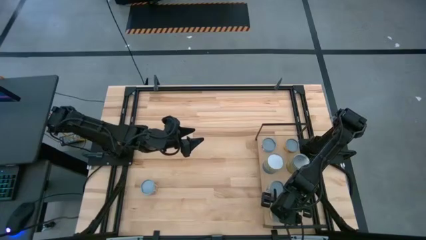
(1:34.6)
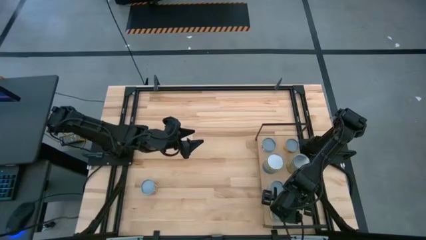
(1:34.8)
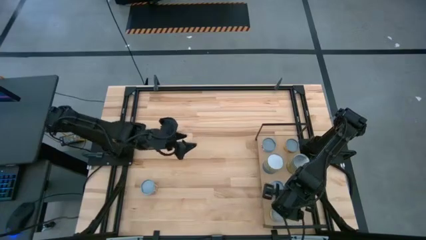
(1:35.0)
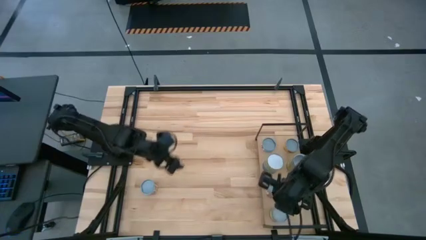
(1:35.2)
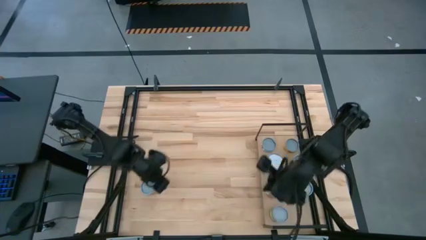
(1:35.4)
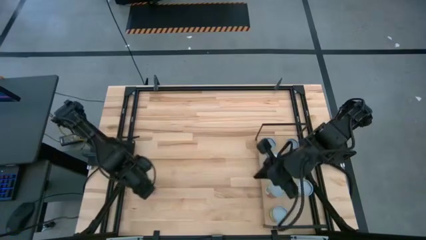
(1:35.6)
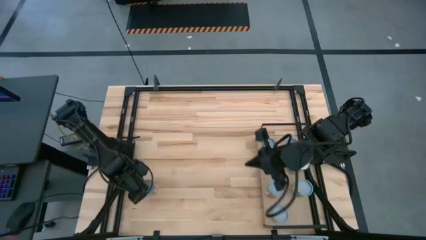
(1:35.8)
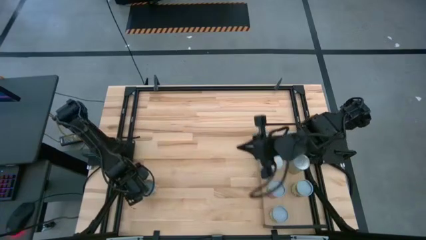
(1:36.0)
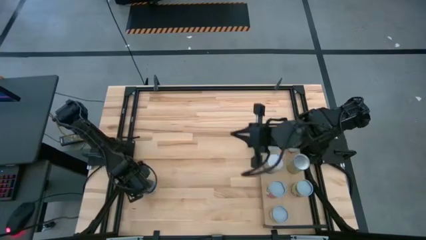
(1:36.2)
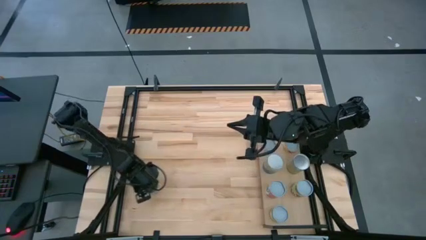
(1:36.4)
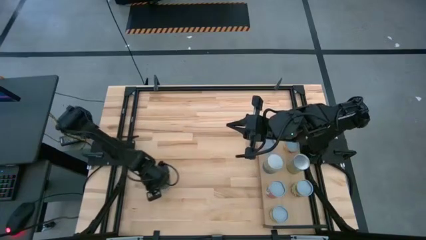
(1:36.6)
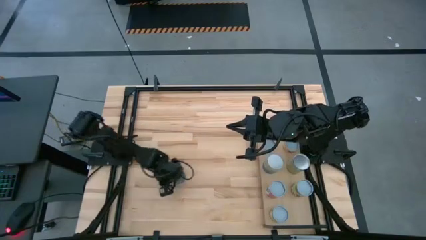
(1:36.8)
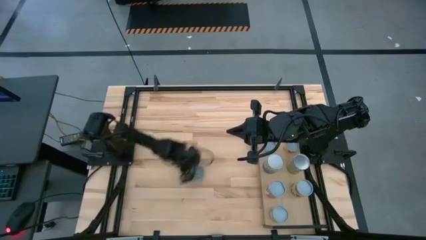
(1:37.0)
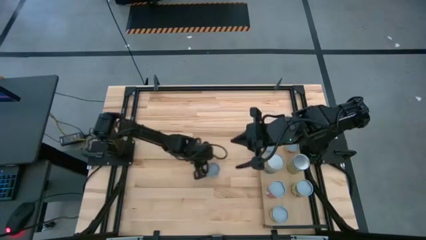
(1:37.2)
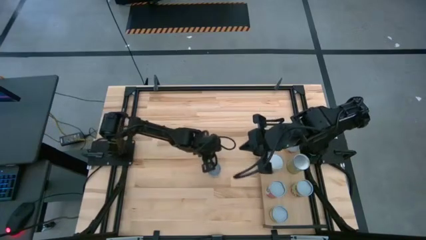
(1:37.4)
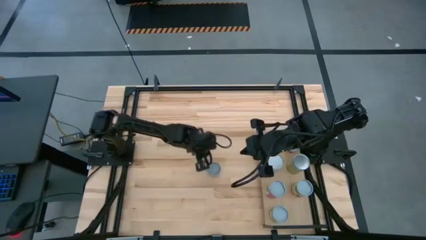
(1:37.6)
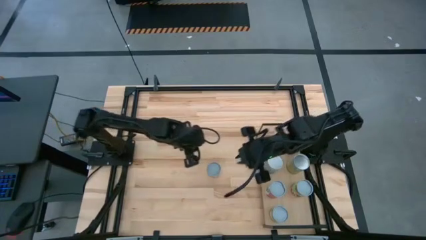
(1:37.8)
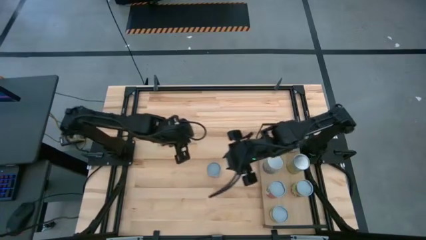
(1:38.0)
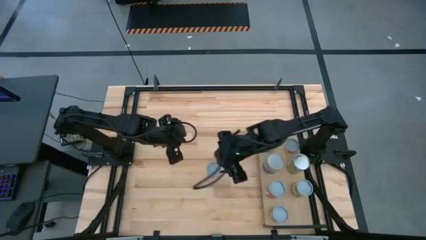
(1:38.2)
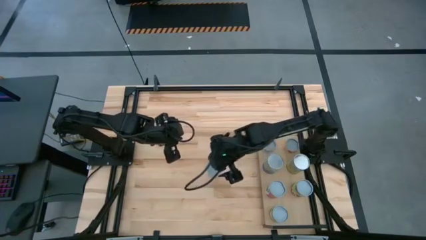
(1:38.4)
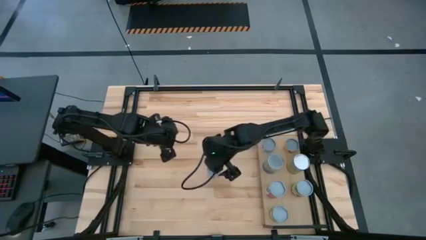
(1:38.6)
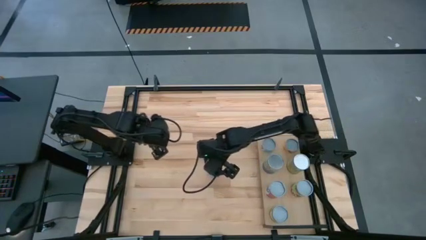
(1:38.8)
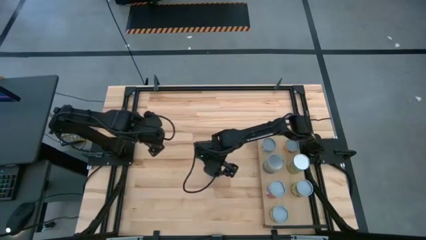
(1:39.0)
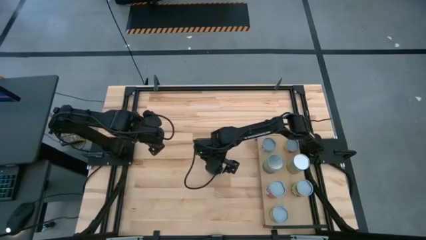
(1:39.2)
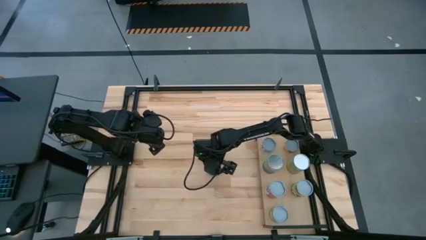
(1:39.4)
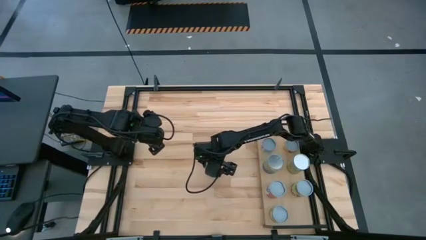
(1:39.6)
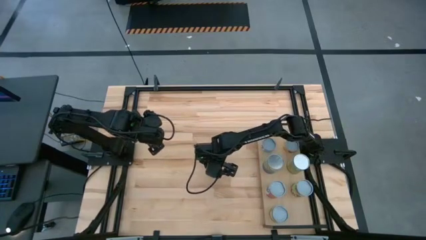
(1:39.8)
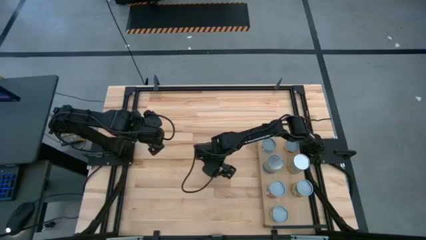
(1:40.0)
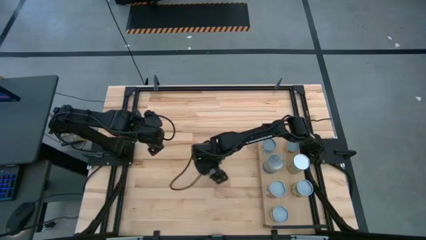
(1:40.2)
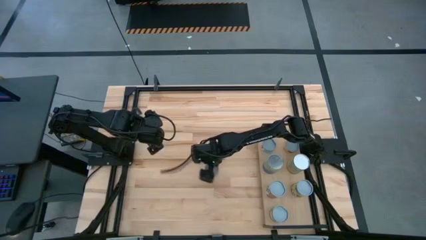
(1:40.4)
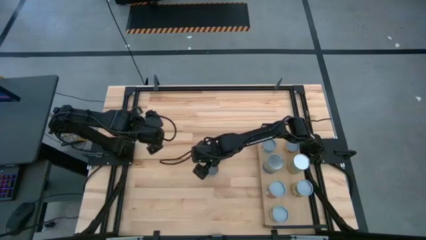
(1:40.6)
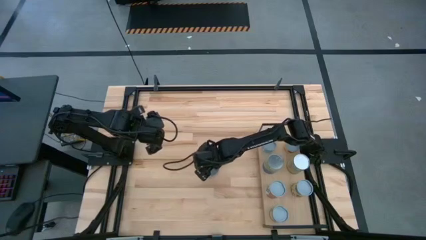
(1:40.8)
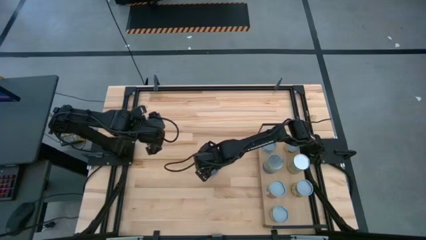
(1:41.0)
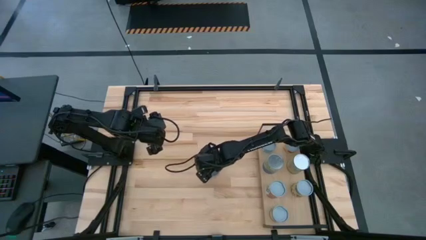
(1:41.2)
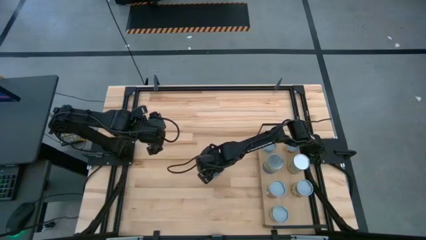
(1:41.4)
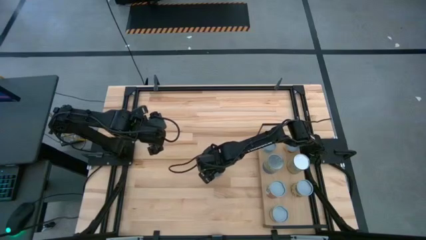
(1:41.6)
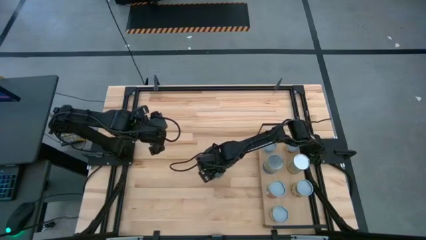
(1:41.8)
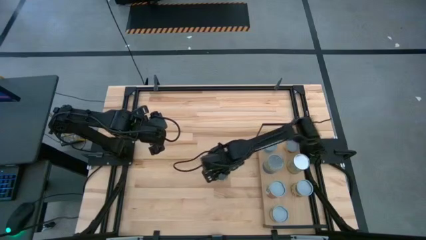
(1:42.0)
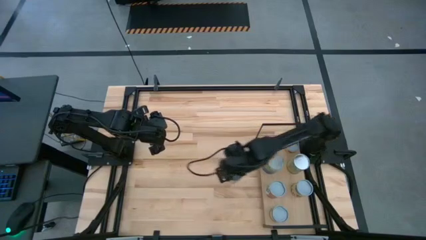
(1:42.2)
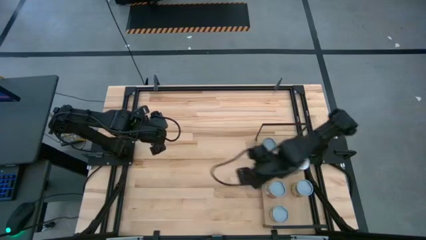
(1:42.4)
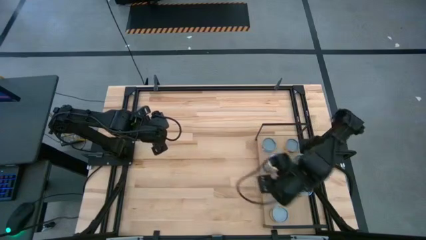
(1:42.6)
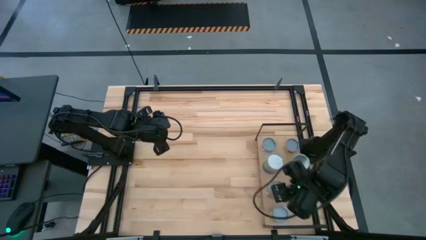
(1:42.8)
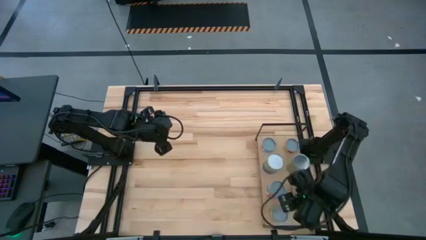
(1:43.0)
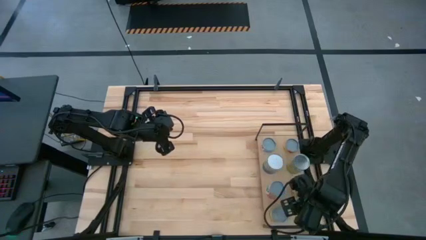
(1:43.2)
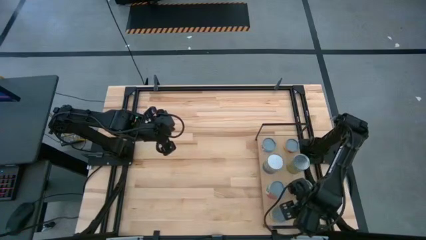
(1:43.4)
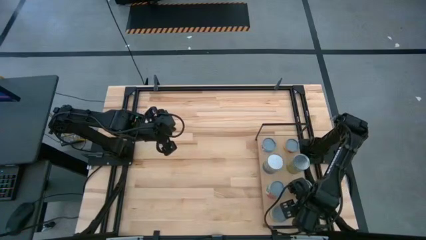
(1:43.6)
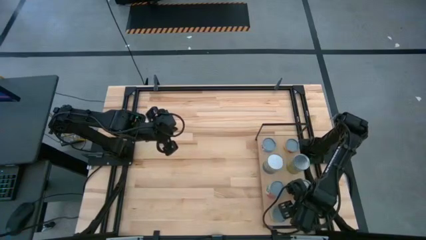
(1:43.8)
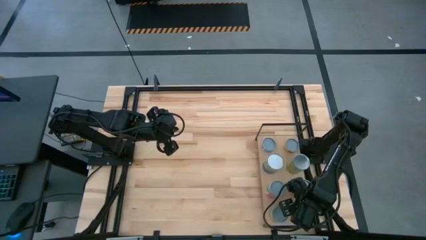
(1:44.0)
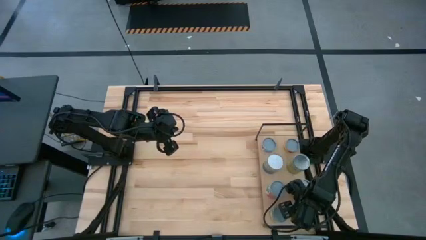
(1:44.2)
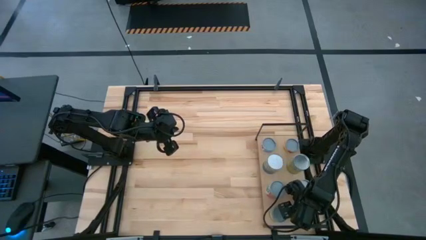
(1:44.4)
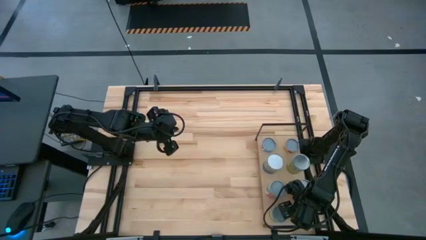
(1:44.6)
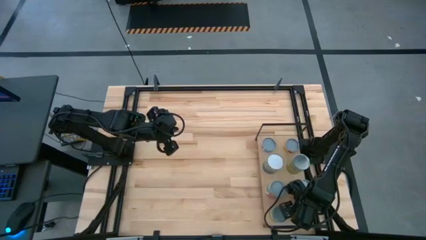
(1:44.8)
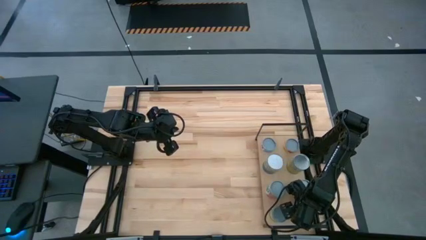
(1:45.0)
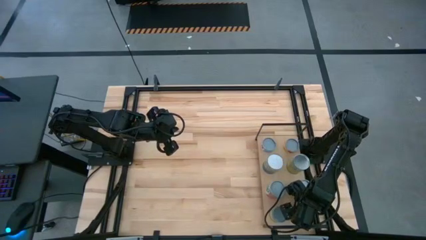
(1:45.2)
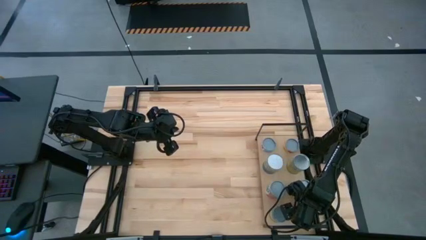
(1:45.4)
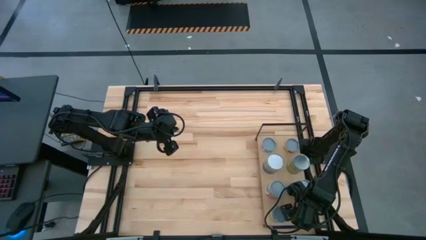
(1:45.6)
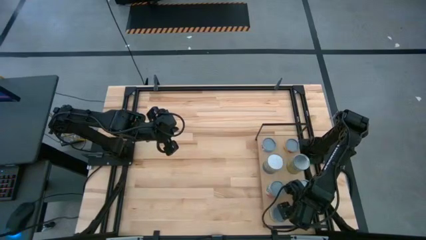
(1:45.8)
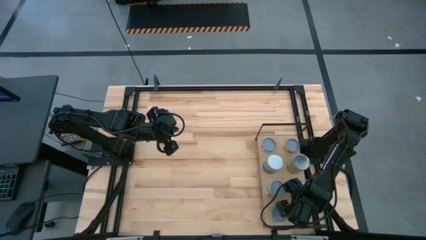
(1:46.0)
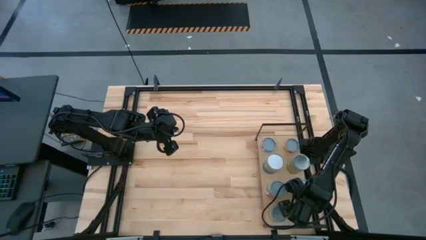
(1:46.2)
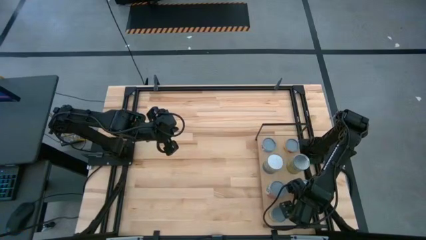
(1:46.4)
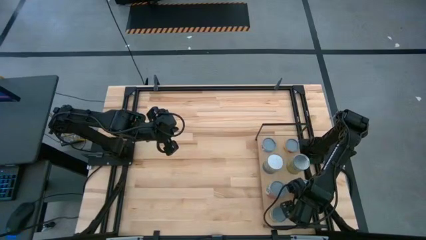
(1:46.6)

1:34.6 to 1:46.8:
Task: Pick and place cans onto a shelf
Put the canned tomatoes on the shelf

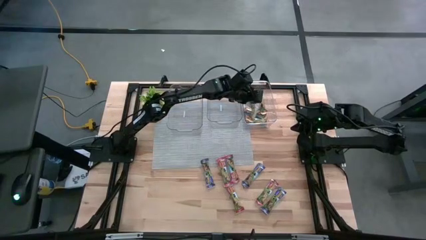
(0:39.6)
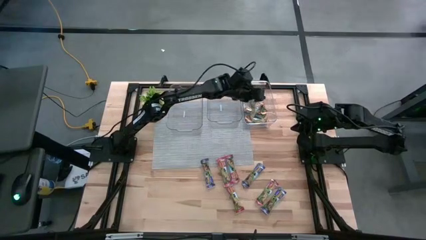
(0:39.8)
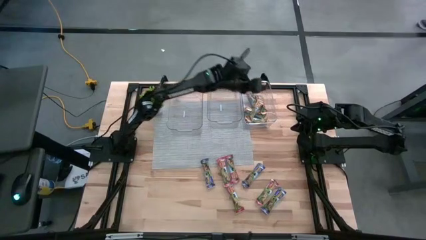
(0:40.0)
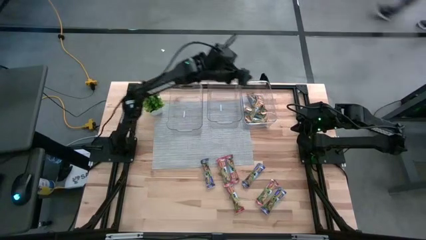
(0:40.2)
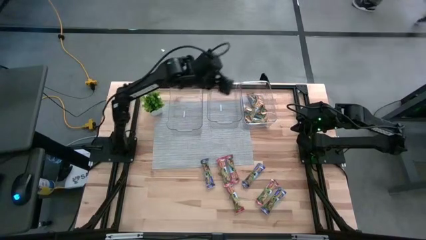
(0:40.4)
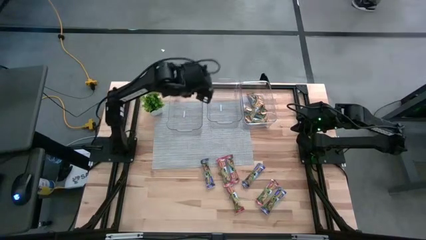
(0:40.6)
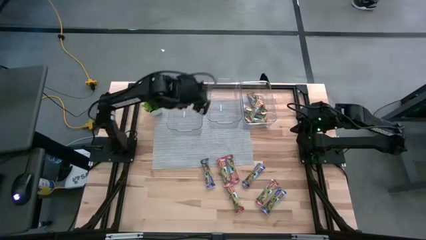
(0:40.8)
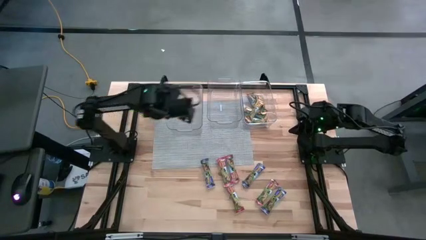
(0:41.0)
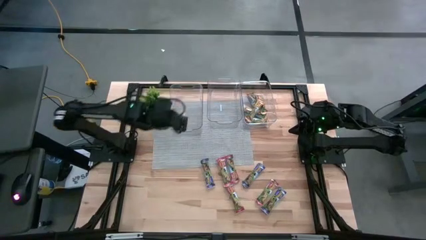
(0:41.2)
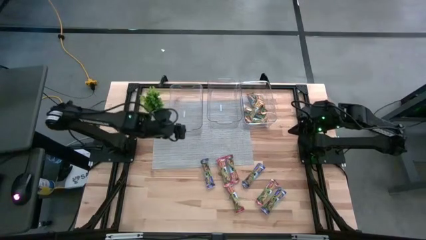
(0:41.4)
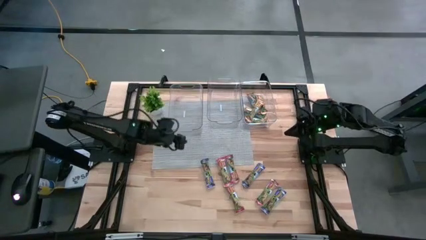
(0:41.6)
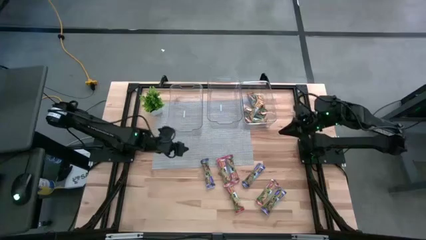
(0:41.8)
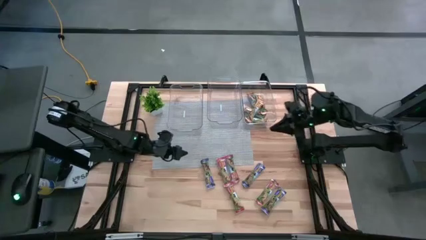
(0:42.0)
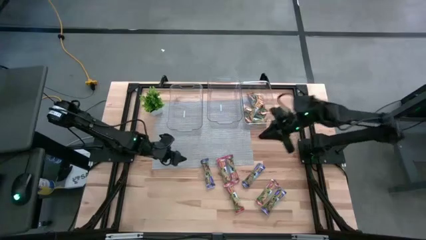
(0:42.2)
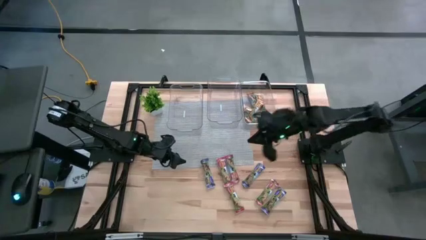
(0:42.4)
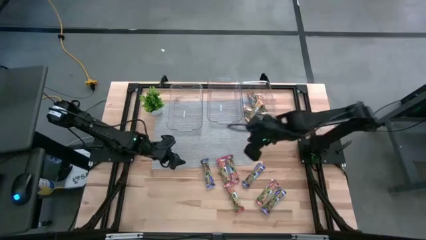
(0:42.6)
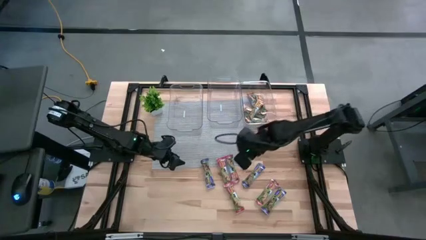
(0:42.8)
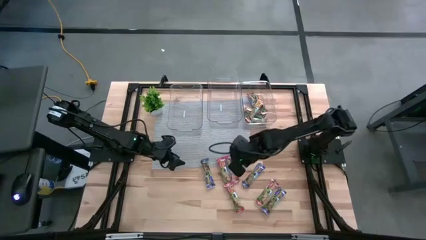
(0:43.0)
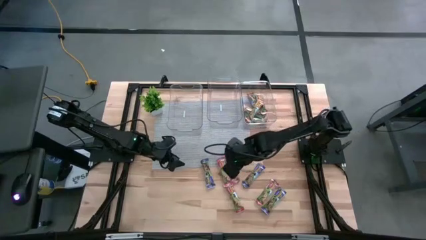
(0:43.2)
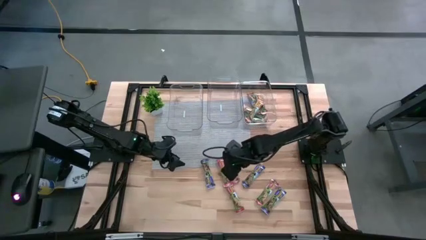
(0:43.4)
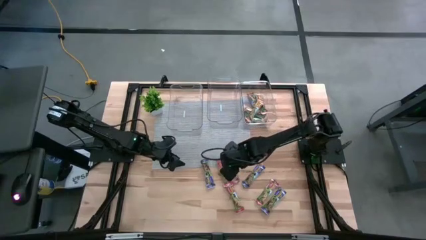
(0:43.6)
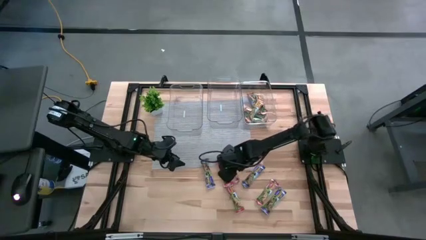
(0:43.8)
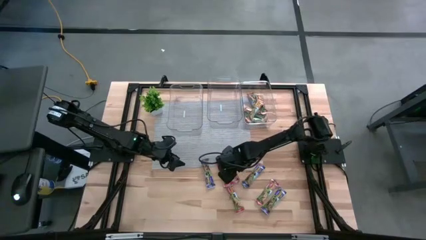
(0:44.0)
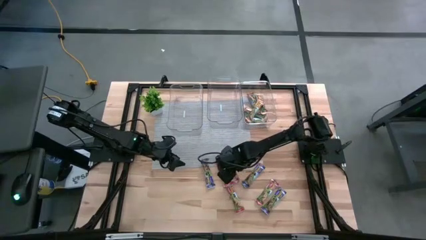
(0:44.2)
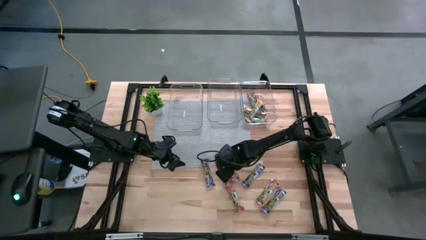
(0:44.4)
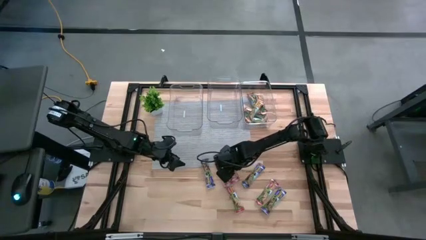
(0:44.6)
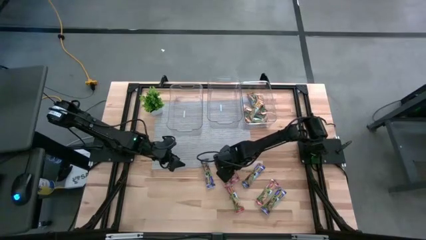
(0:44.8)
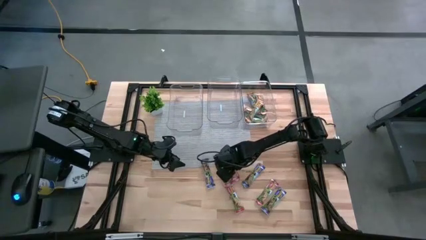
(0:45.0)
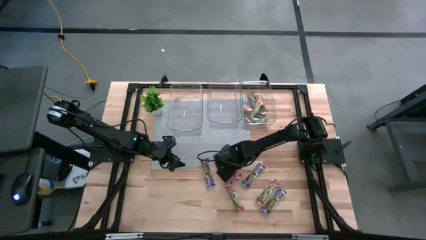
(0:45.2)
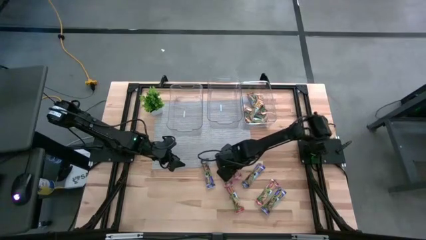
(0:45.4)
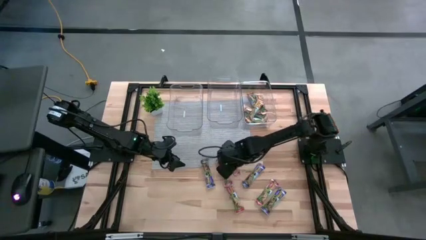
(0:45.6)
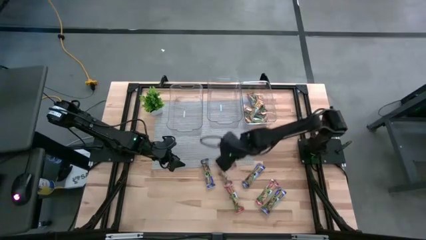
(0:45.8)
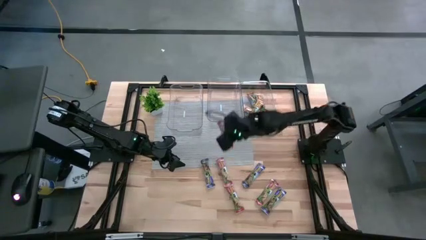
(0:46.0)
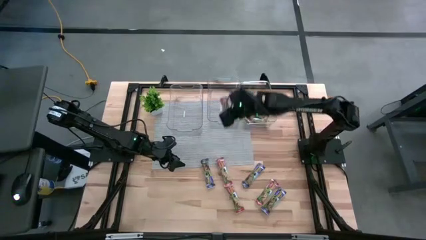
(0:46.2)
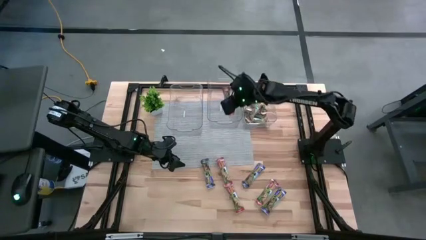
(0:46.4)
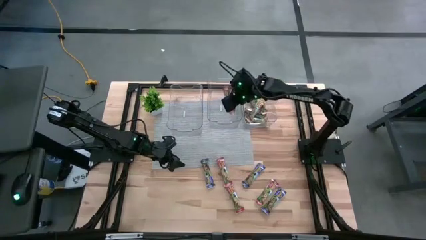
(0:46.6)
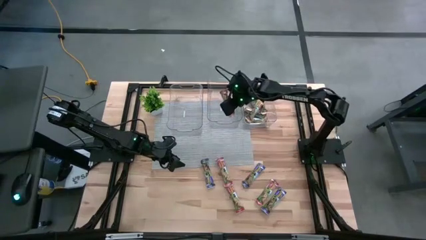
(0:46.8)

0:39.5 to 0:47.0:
Task: Pick and place Granola Bars by type
Put the red granola bar into the middle transparent bin
